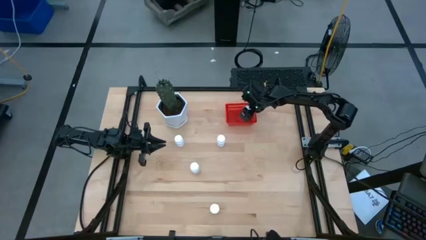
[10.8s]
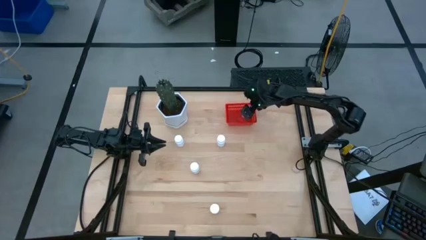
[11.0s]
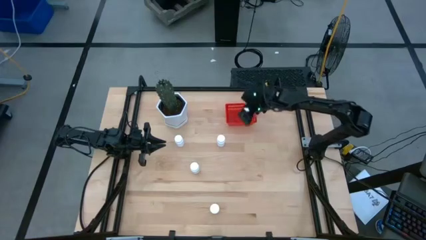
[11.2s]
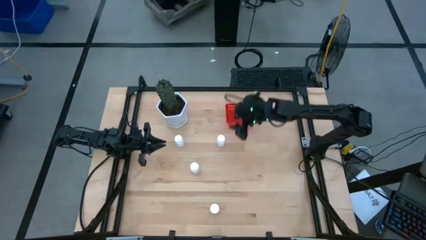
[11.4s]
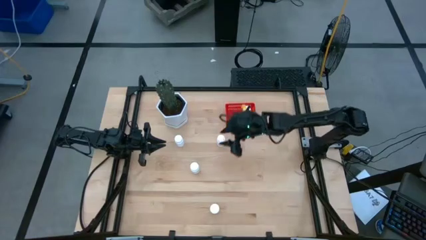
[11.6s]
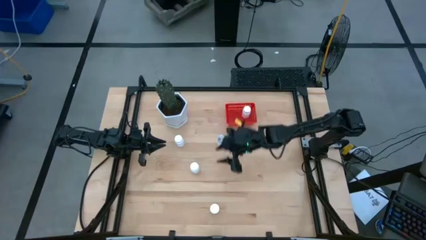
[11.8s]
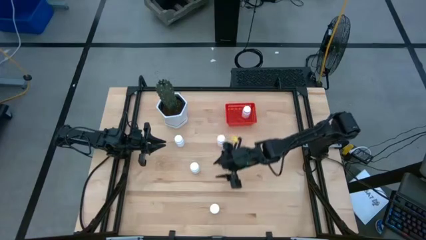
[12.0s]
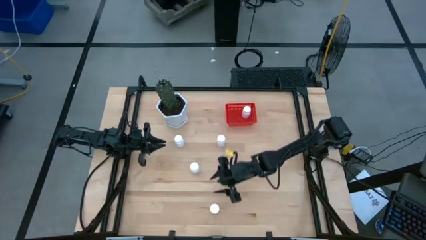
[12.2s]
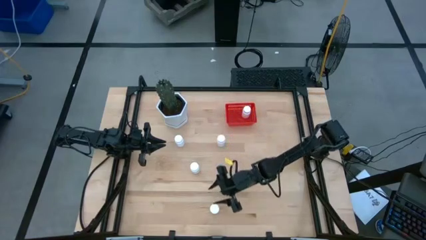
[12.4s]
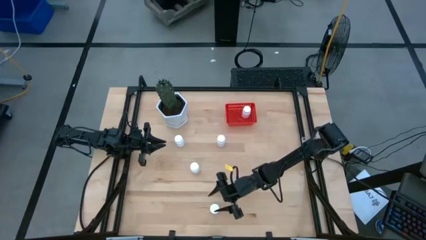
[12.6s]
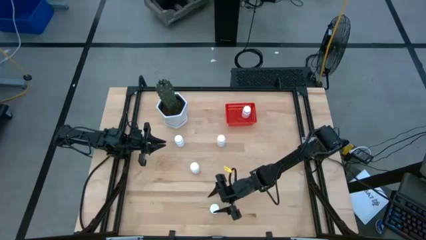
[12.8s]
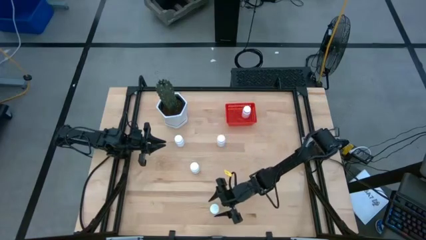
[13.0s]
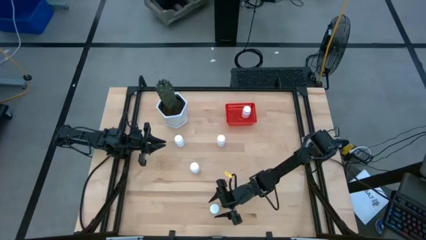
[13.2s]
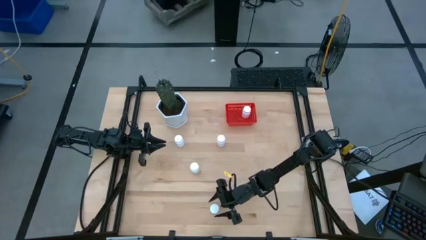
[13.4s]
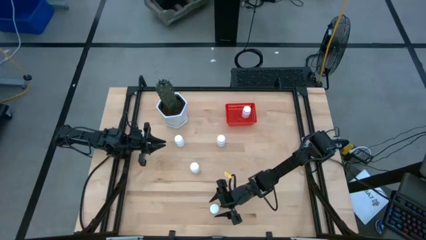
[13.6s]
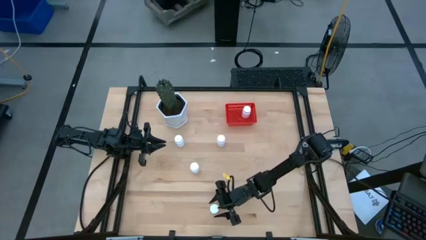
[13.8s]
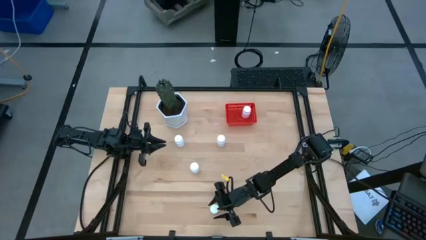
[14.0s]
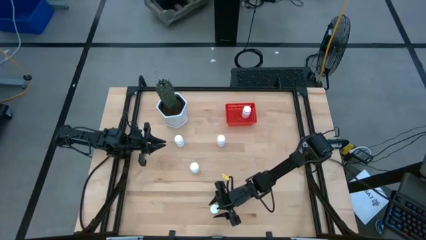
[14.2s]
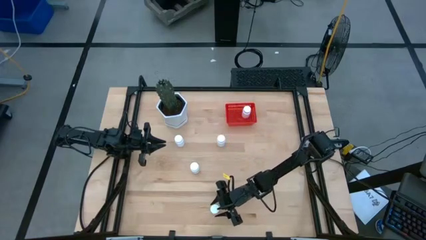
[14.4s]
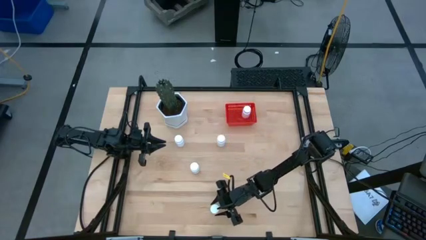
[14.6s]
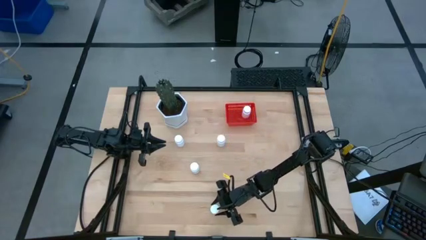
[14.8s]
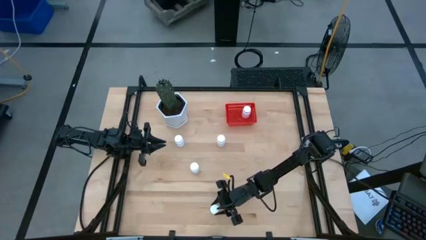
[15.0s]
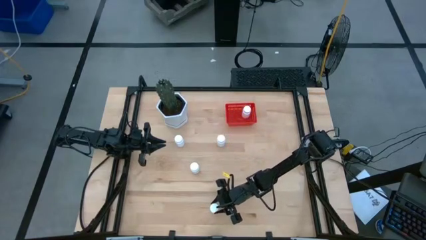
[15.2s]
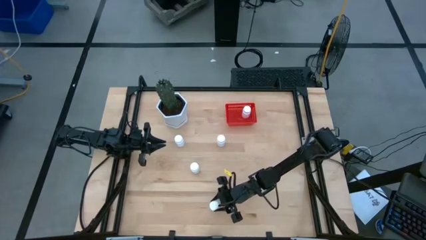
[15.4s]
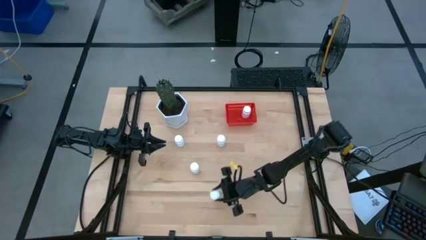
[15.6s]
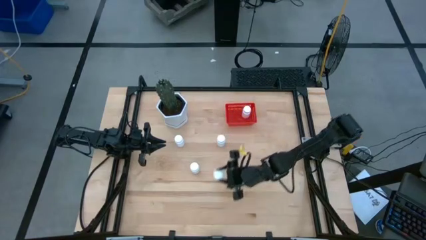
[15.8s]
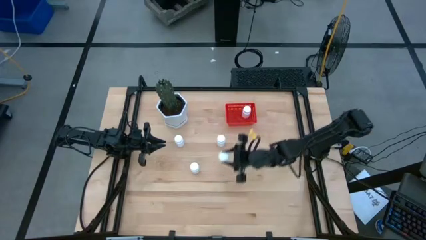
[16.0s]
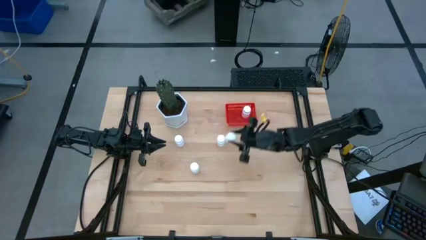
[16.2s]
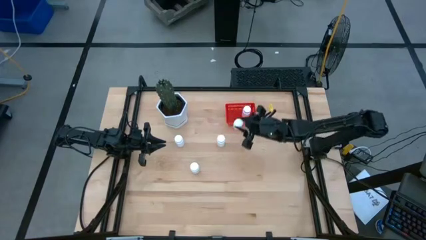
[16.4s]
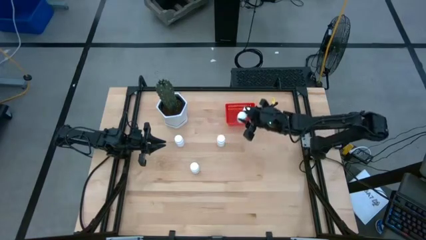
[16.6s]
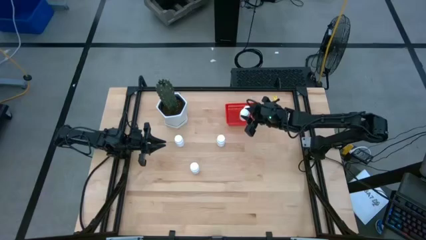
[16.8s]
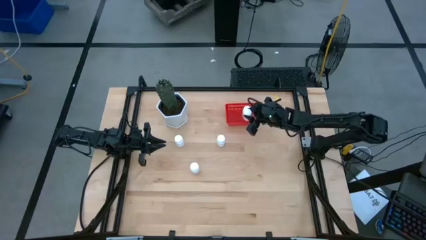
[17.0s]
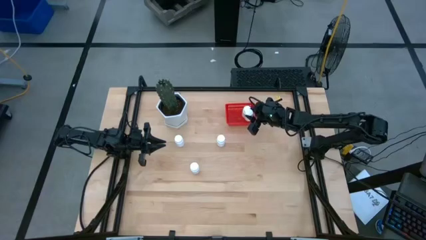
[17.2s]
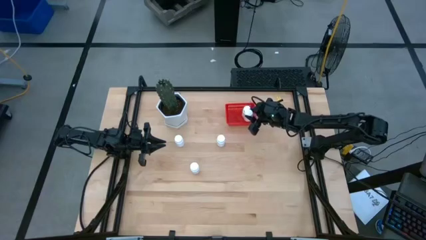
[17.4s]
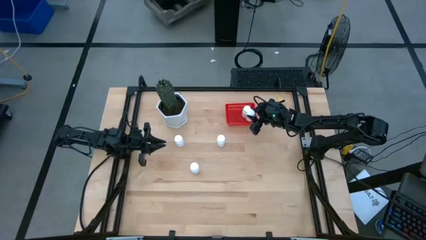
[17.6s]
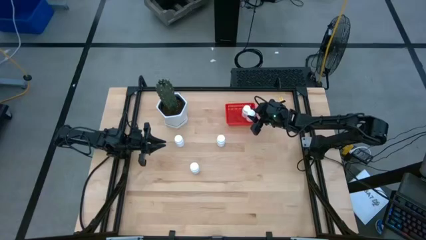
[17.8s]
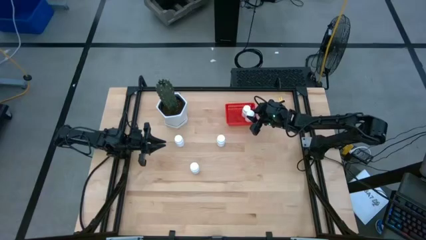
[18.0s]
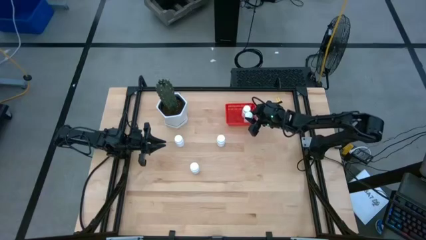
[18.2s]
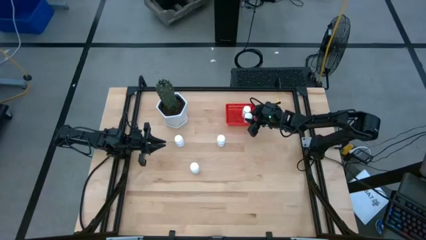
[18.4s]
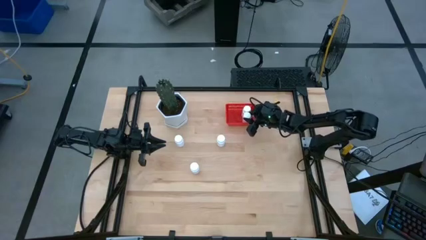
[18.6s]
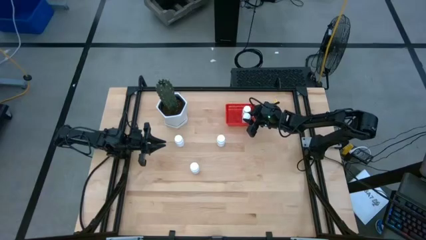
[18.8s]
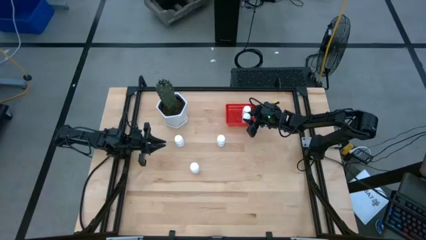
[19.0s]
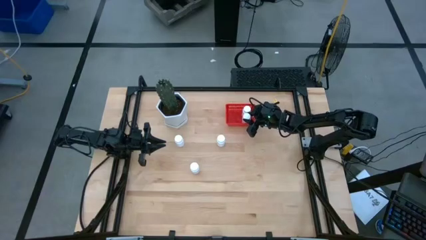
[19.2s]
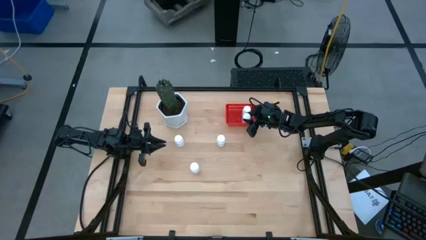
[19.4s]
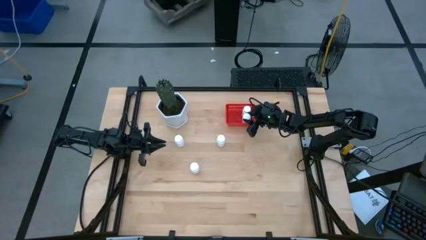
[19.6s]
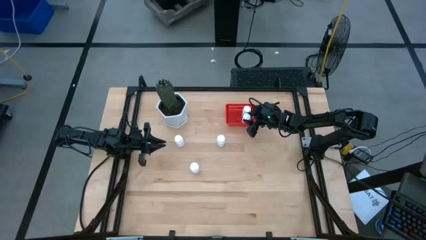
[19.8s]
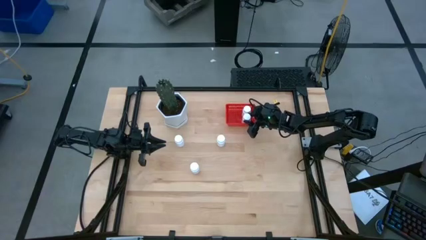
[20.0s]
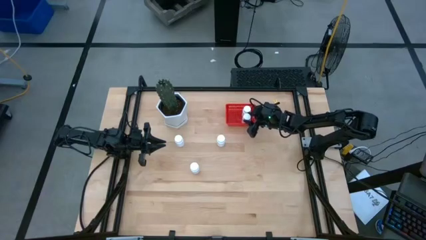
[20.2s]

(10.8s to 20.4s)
Task: Pick and place pill bottles into a basket
Put the white pill bottle into the red bin

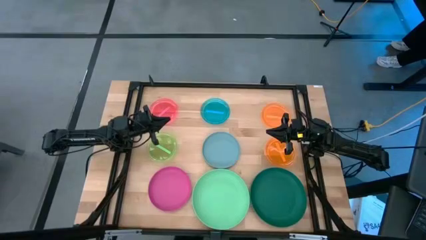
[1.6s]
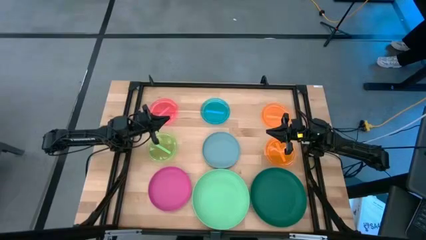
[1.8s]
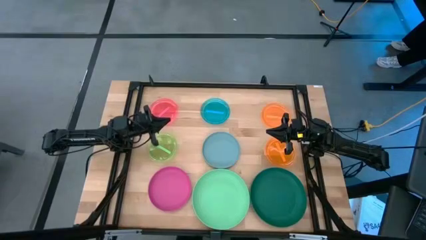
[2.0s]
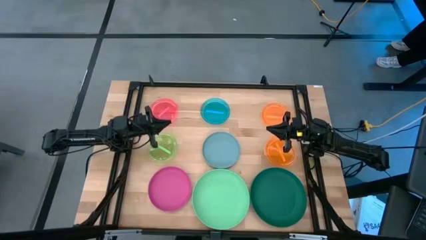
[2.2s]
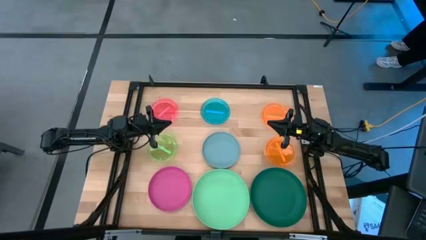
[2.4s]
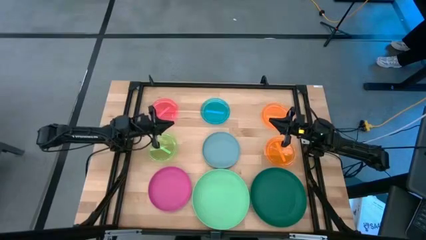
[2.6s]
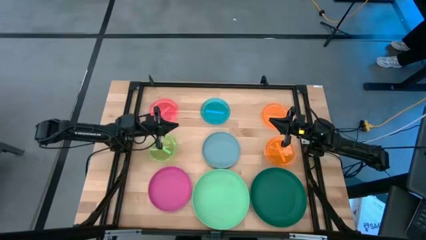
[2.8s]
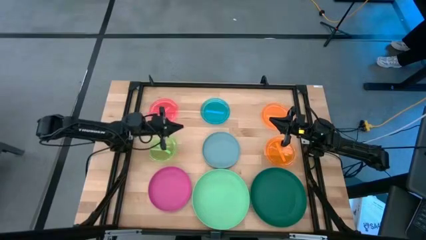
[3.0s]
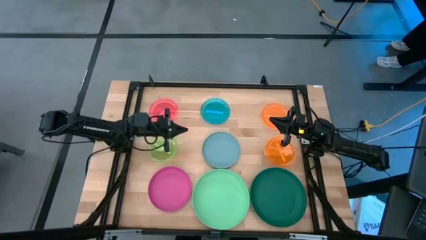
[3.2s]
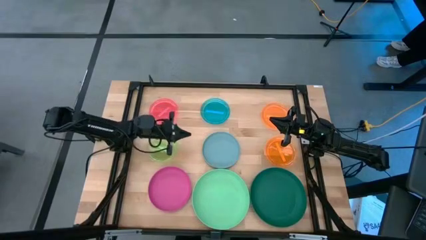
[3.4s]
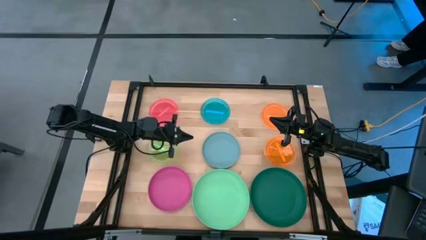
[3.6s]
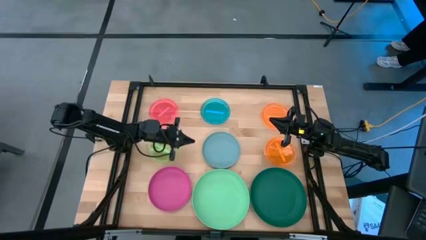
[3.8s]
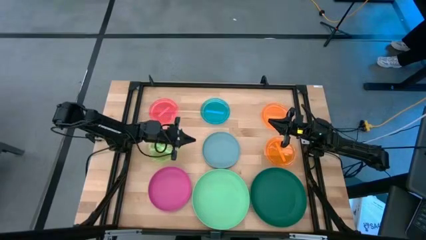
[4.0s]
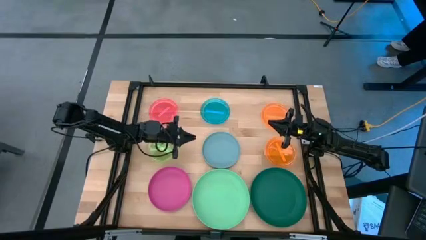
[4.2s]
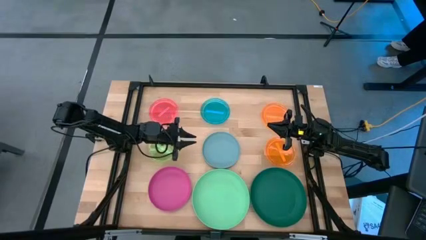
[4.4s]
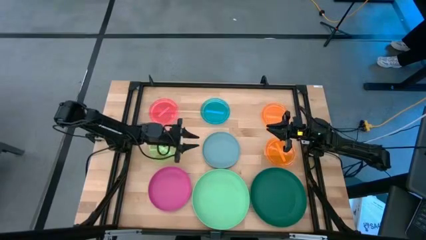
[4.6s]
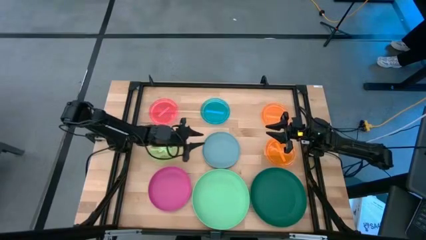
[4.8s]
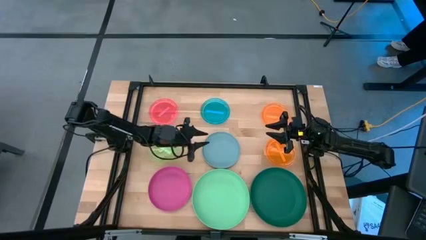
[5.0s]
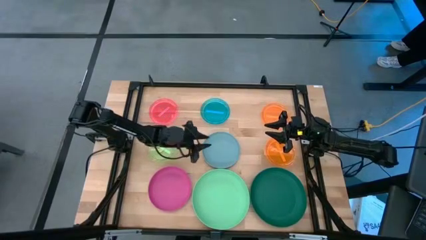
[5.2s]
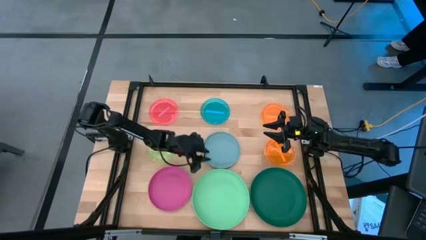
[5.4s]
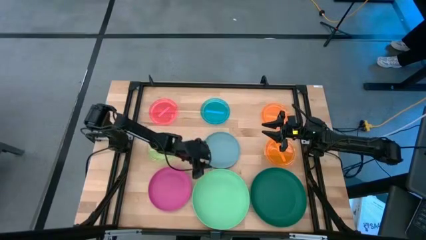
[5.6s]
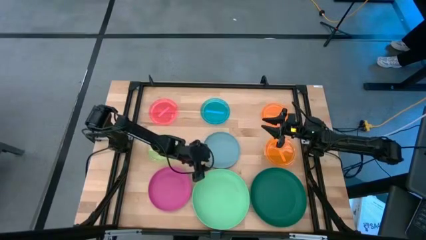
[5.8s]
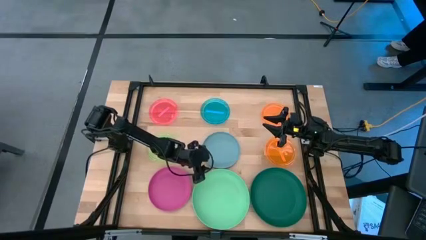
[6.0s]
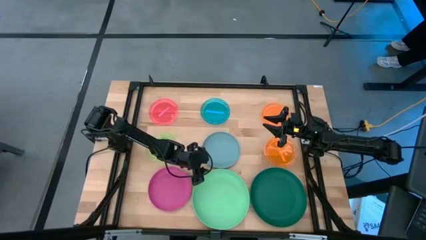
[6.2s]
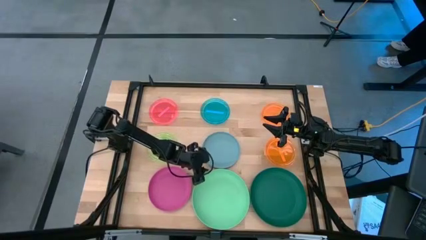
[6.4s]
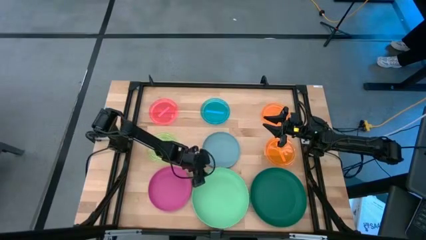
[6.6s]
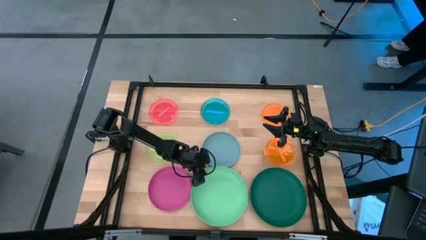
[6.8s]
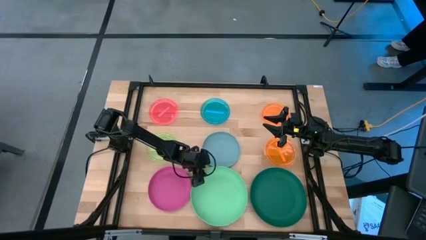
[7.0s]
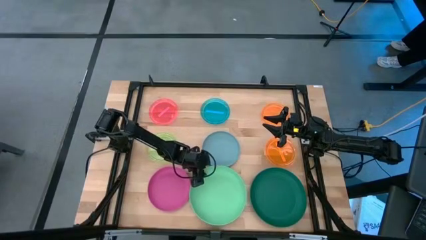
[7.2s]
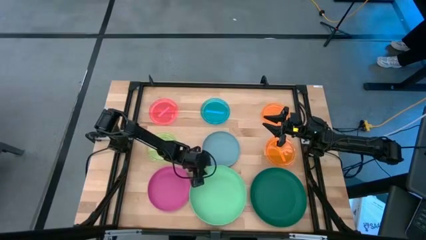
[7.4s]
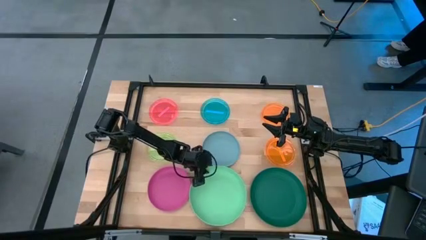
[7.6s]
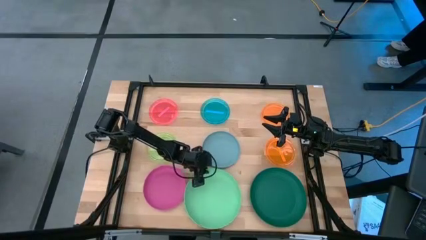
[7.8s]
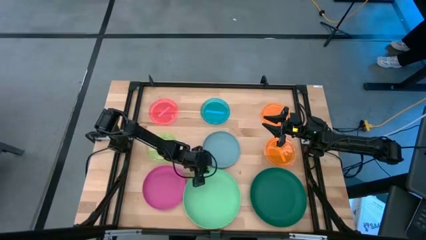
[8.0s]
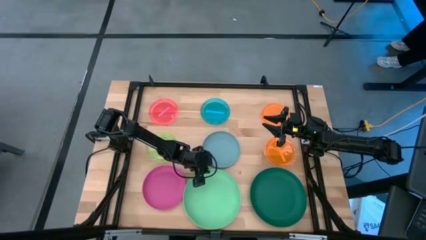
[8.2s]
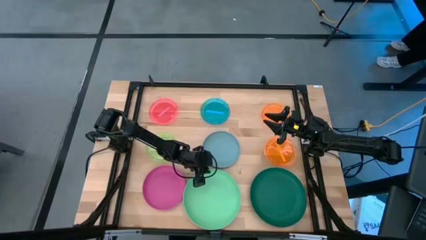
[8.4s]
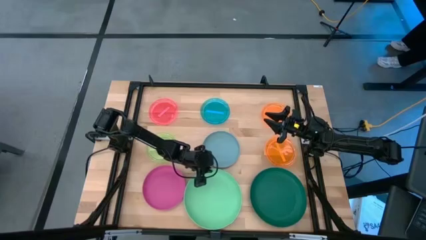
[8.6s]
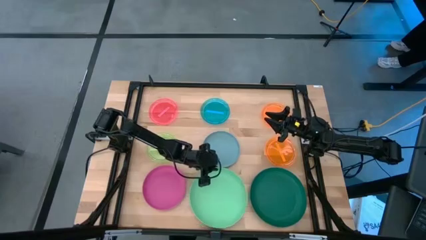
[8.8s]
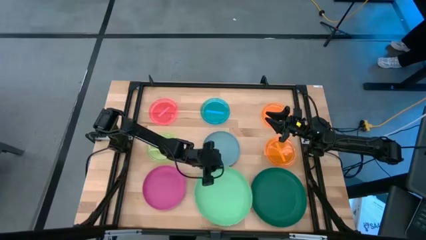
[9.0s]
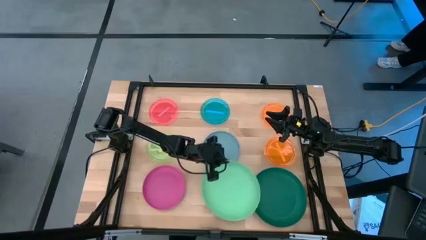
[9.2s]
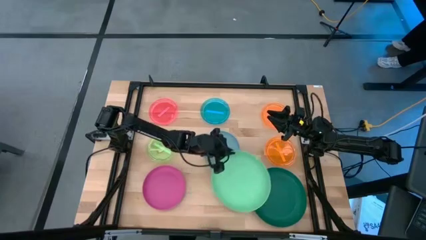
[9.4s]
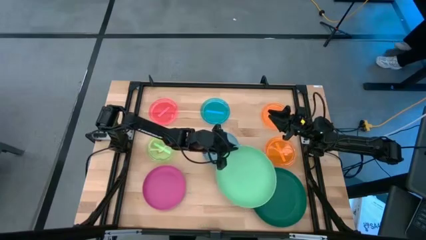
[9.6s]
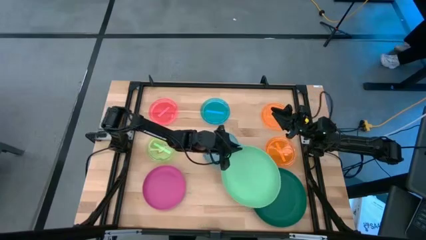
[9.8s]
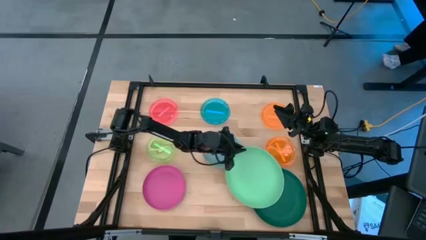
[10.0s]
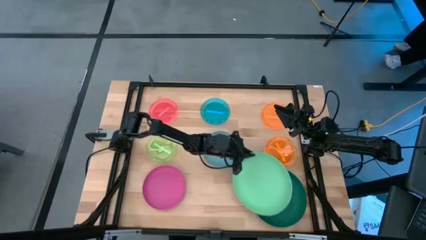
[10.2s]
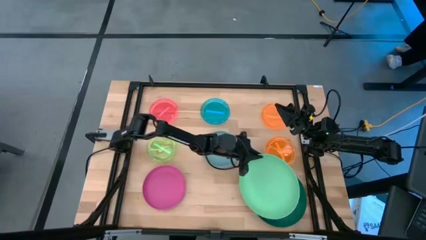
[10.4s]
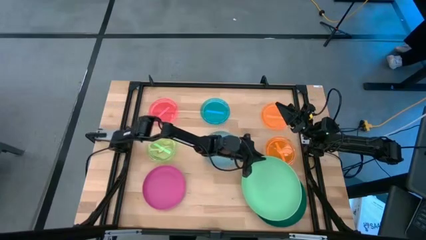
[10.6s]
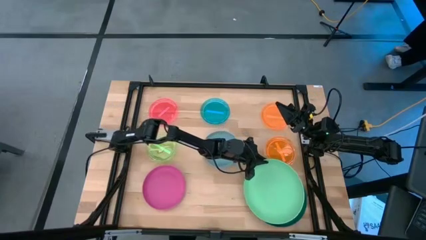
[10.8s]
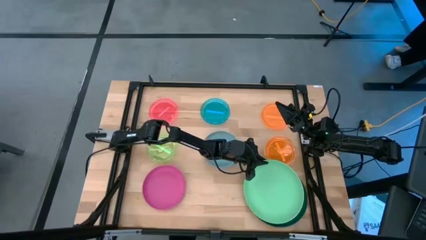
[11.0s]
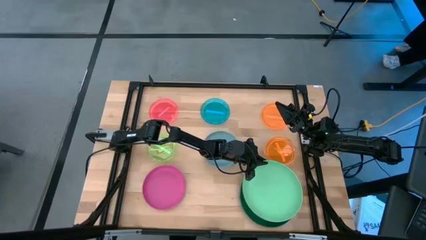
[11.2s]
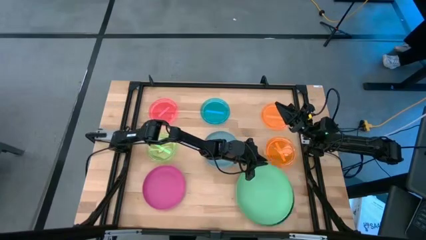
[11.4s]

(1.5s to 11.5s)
Task: Stack plastic plates
Stack the light green plate on top of the dark green plate
